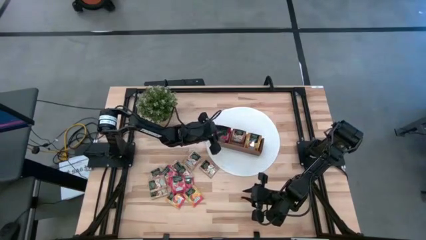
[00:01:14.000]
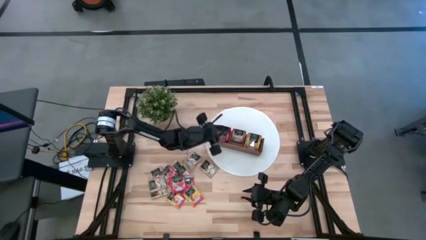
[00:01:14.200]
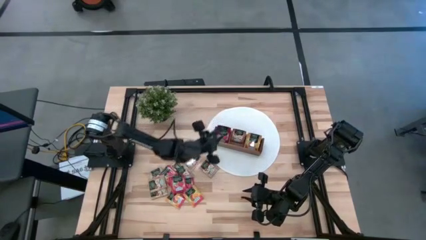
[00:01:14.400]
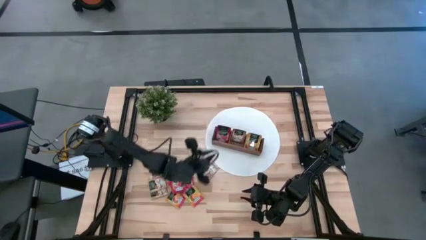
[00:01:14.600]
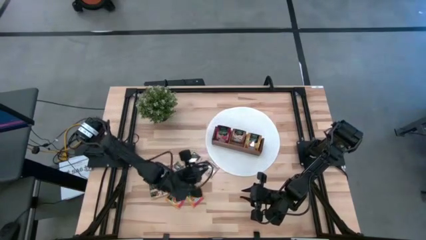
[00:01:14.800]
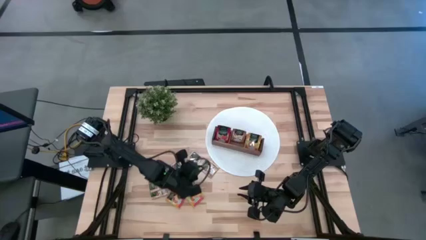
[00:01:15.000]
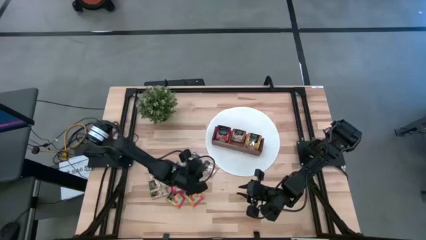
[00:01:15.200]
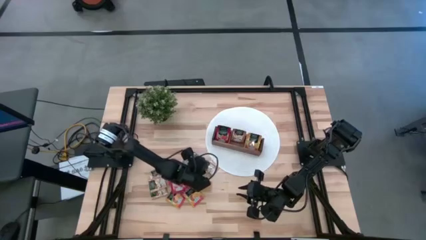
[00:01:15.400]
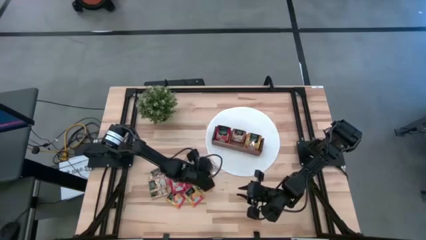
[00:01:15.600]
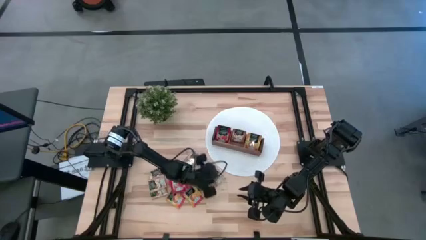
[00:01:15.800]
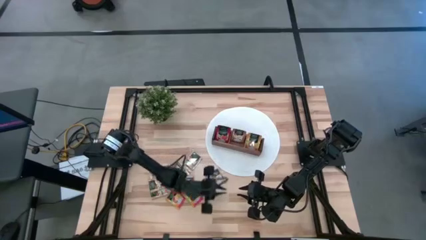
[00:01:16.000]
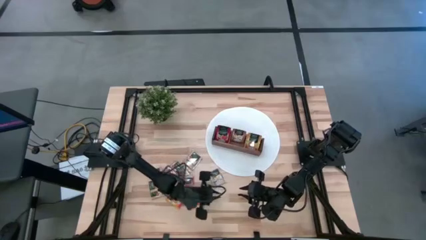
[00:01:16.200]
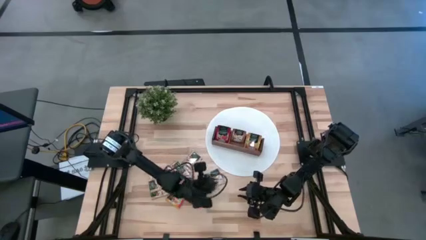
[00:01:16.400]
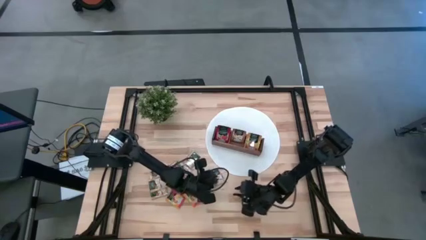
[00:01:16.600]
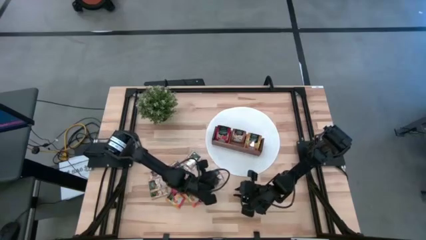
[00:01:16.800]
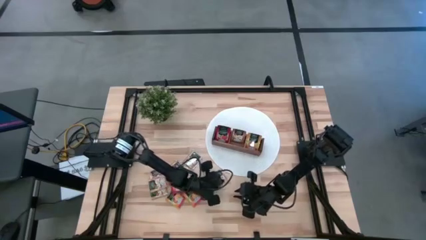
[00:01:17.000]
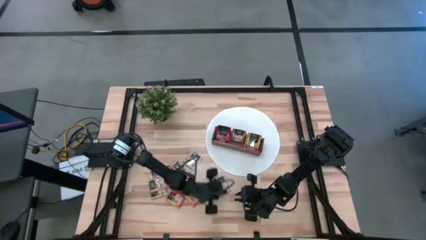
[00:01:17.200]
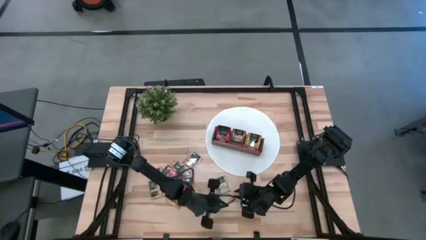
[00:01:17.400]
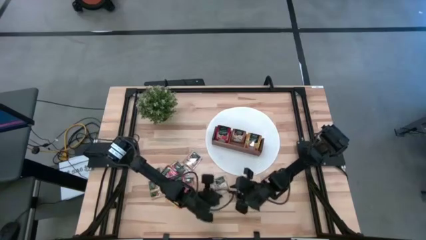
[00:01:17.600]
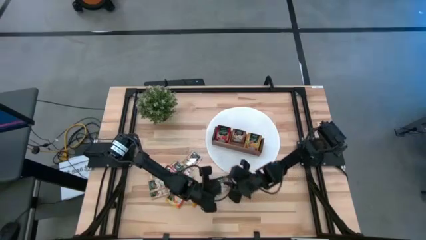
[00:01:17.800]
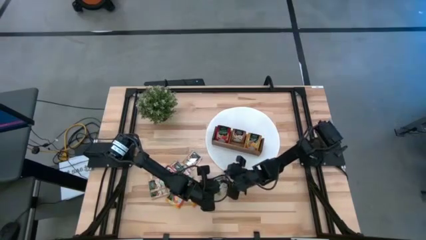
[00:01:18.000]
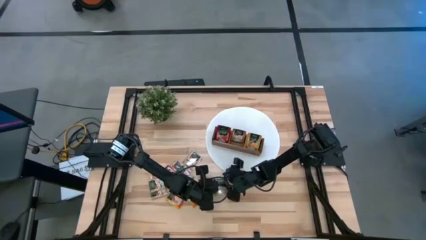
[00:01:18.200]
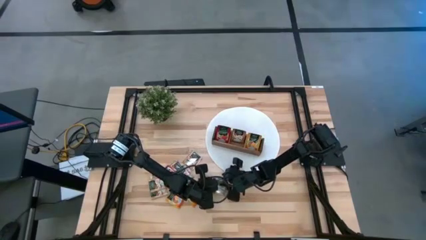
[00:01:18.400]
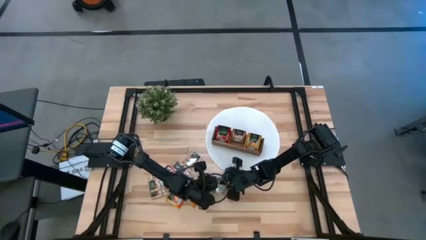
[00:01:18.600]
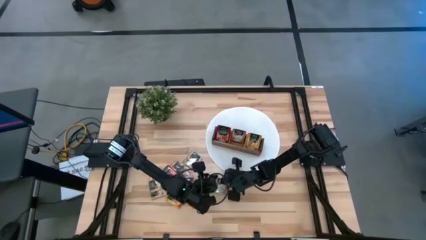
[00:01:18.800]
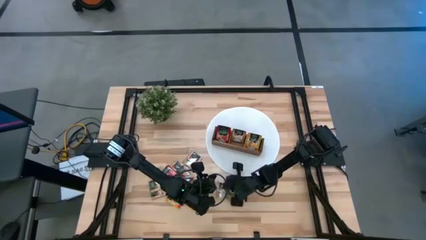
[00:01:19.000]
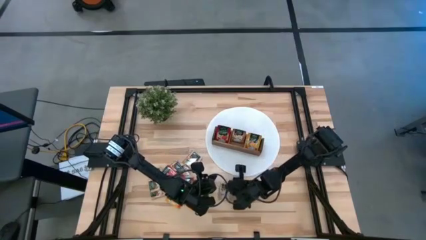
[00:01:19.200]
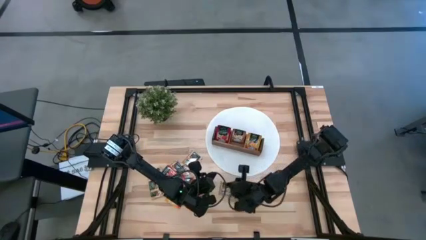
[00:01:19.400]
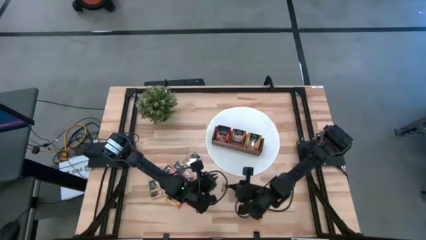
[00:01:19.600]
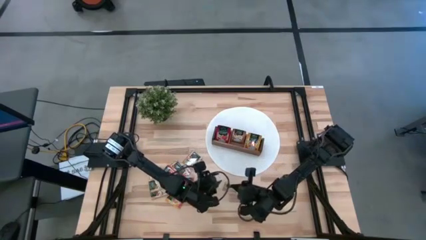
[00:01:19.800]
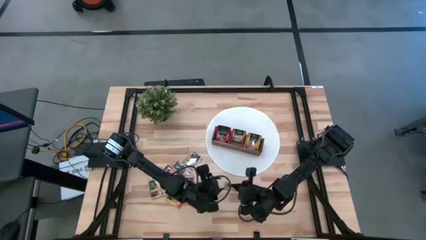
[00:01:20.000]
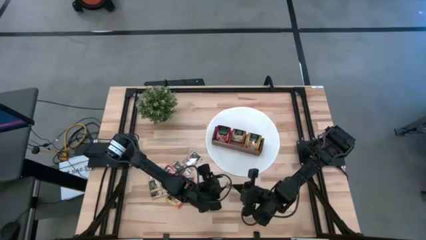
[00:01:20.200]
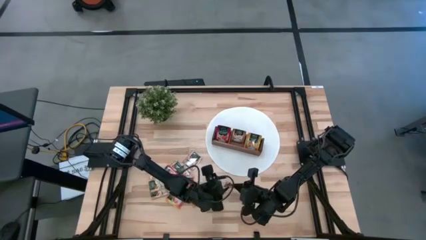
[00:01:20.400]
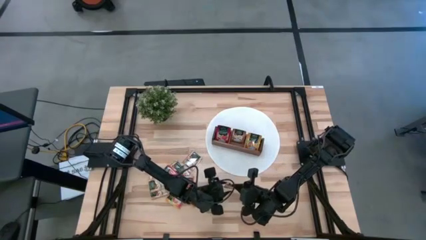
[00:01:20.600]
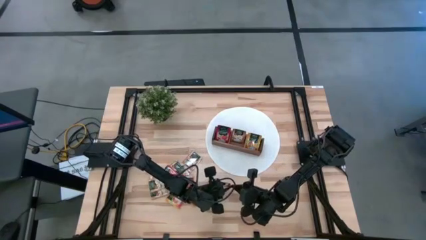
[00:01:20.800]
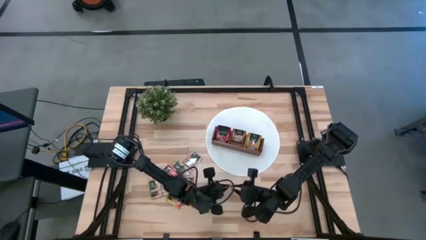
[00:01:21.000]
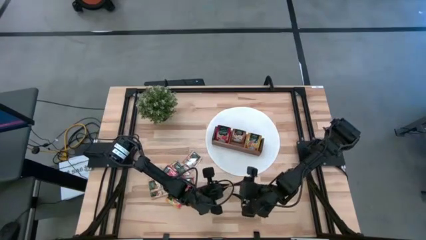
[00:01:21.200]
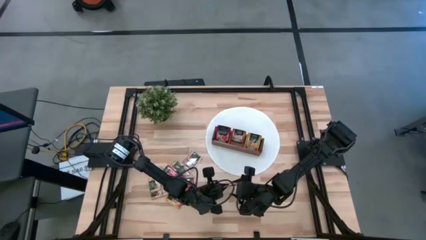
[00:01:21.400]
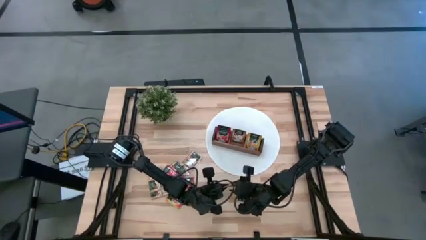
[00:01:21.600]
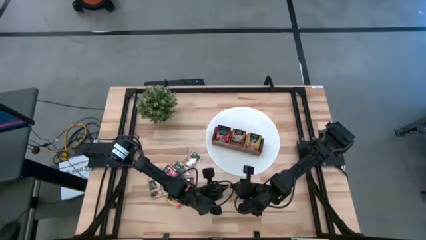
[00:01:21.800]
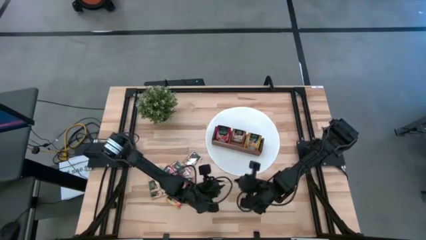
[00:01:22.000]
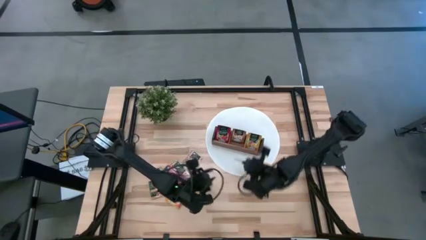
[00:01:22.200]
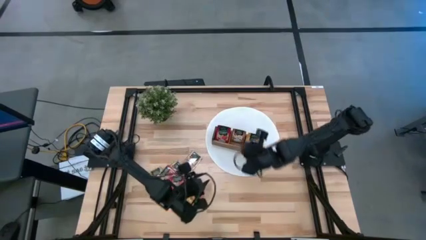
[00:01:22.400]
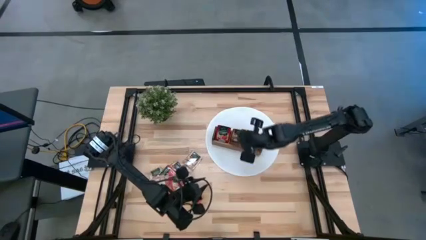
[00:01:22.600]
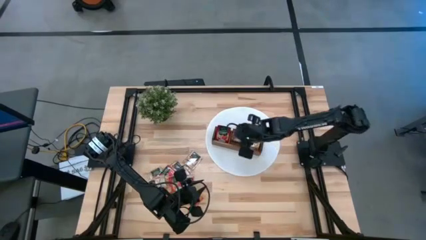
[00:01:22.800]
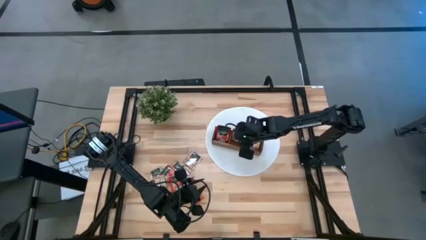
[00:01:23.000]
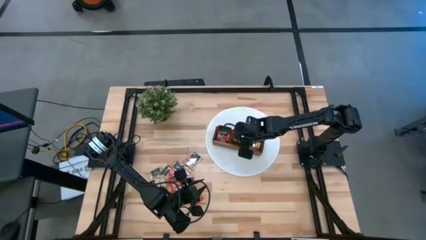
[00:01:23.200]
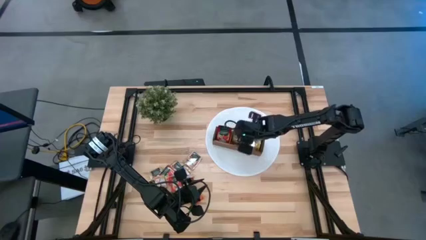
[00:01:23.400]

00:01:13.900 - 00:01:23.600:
Task: Pick & Place Tea
Put the brown tea bag into the middle section of the wooden organizer

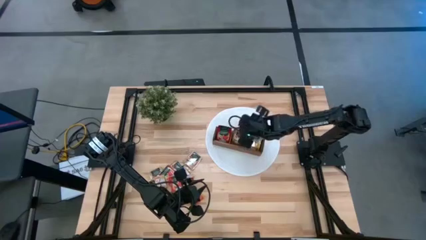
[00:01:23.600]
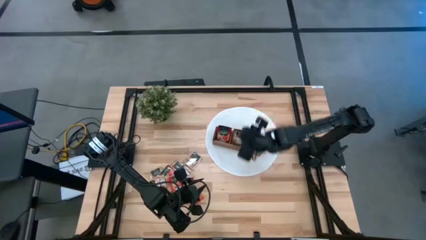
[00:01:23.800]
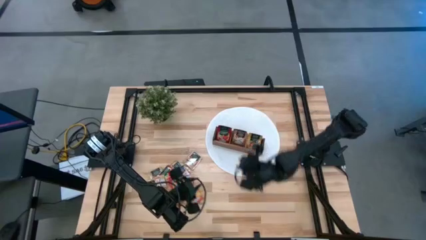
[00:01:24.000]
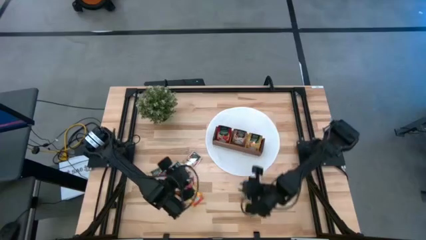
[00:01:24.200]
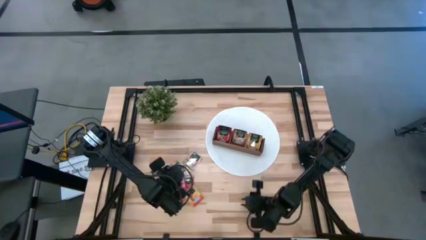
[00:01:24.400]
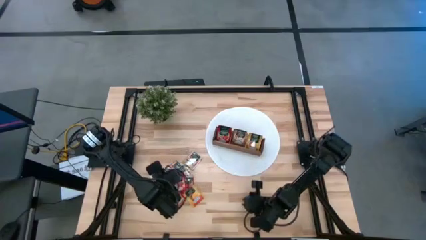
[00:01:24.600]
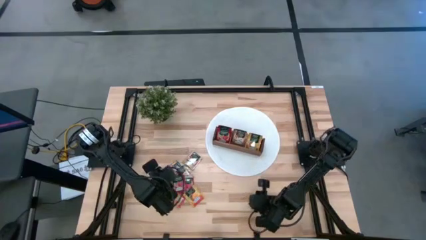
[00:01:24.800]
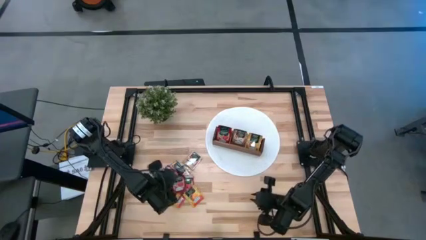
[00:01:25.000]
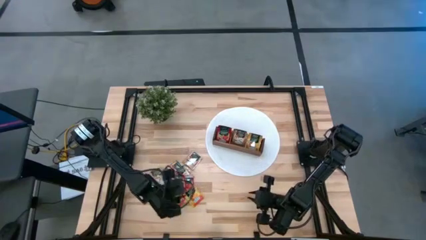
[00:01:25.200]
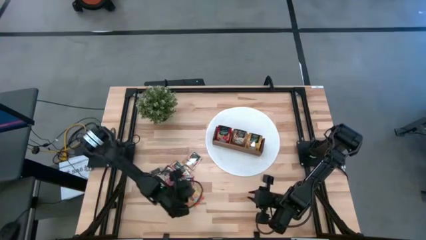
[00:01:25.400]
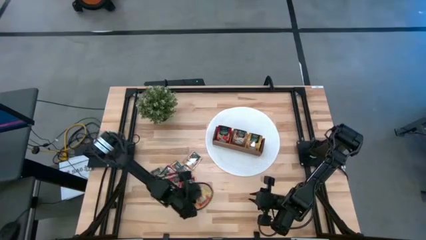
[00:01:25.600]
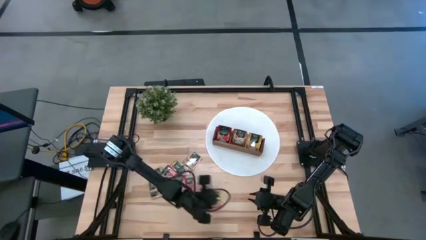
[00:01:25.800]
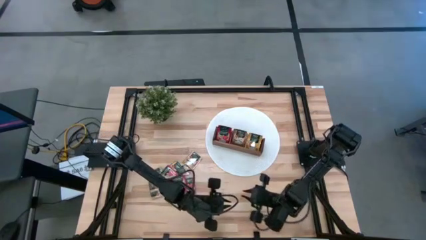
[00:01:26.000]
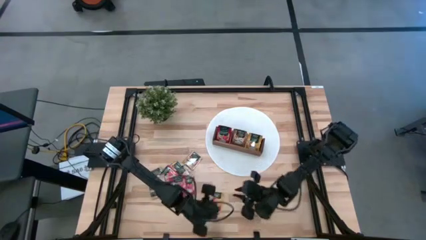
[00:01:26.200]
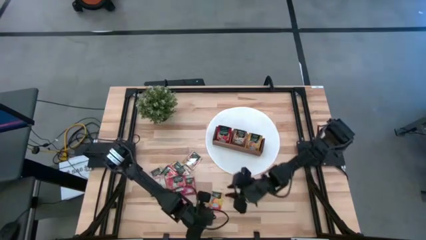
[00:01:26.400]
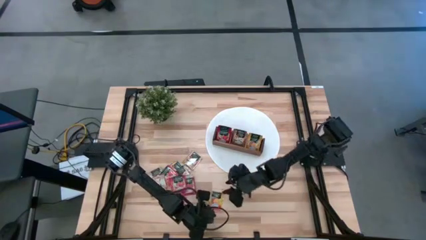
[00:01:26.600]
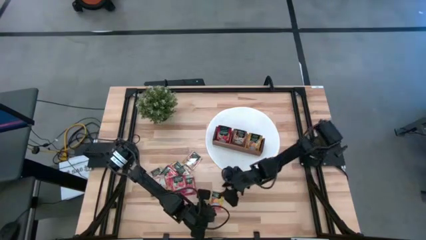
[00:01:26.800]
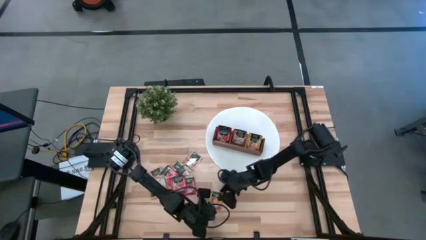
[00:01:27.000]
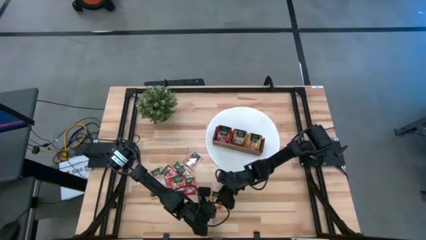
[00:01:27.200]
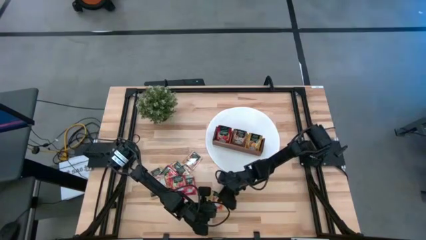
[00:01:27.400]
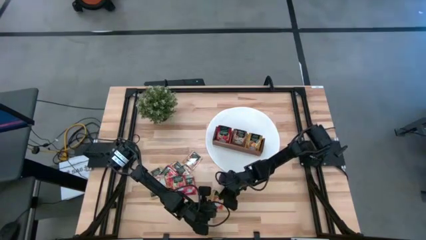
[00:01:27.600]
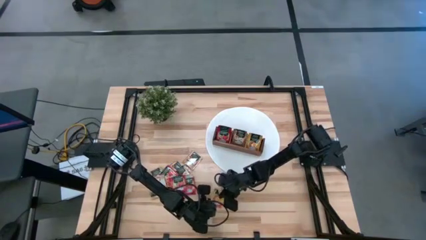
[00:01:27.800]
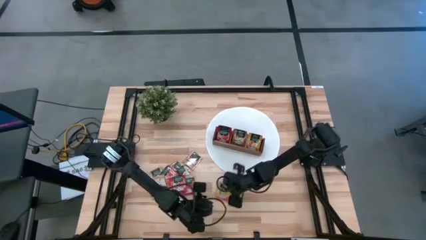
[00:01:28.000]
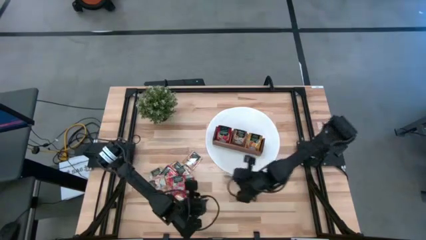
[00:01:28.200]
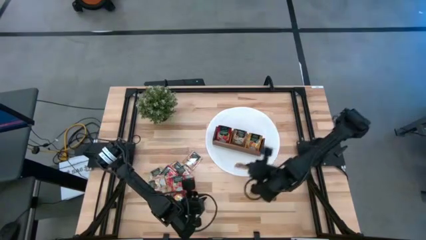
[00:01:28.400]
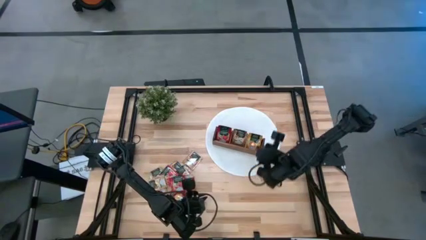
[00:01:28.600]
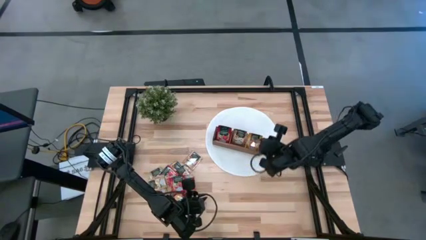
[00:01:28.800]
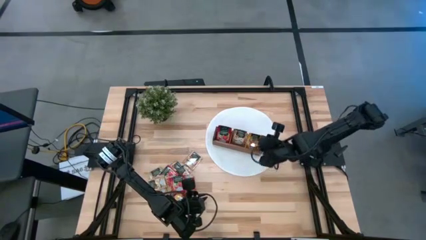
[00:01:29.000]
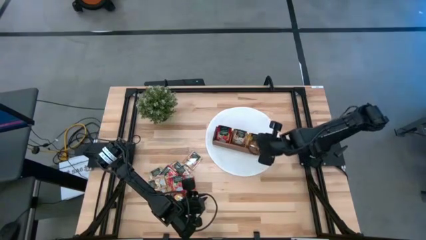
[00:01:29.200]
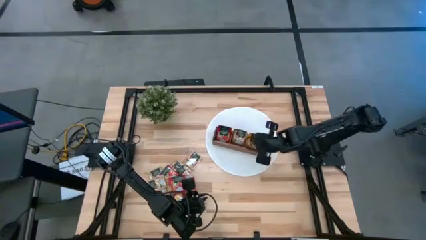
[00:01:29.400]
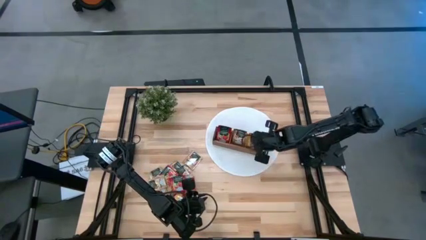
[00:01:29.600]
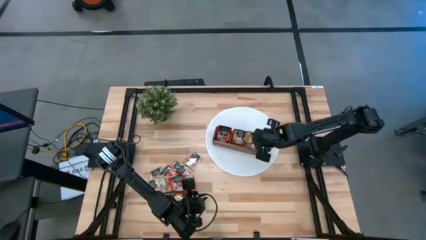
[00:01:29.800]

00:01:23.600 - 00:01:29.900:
Put the yellow tea bag into the right section of the wooden organizer

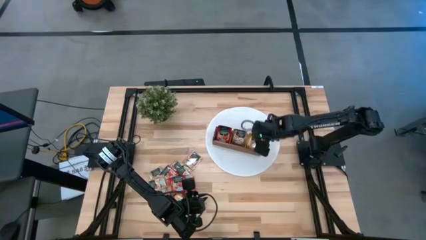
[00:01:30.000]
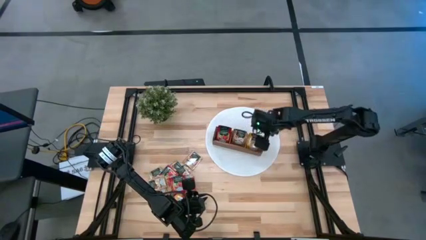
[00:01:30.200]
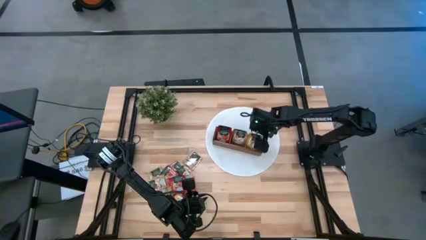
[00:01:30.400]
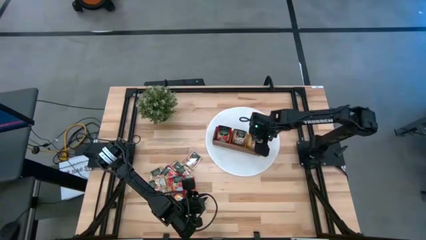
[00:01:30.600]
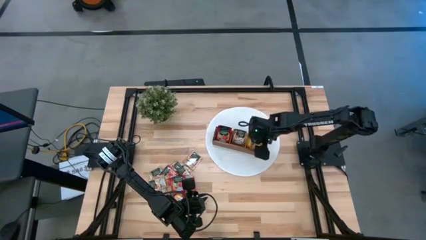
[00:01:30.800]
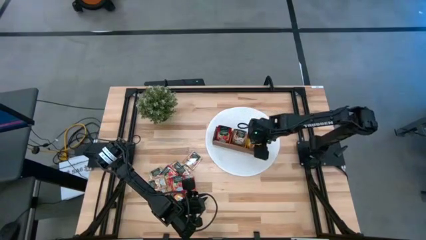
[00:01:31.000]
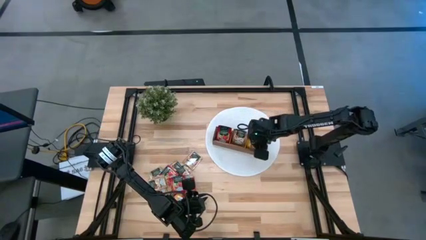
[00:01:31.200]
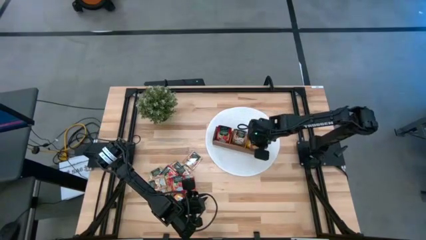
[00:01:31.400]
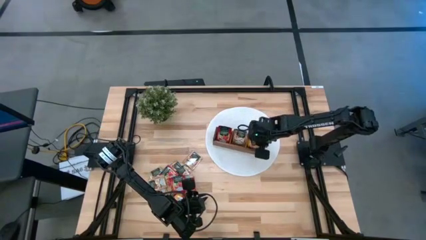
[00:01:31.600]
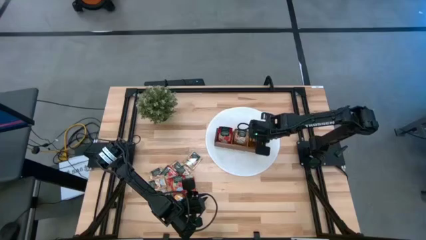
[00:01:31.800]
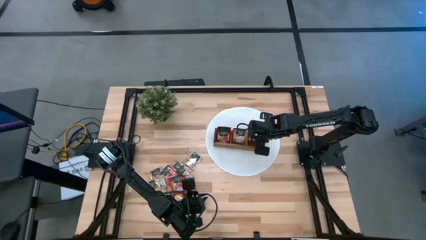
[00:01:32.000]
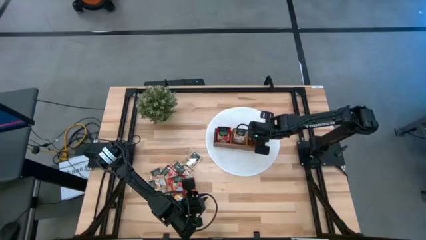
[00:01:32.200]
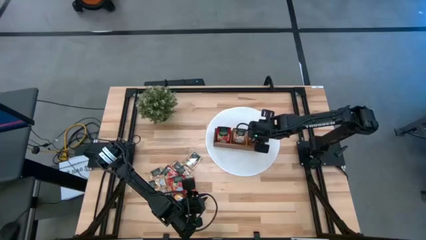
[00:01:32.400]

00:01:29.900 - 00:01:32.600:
Adjust the yellow tea bags in the wooden organizer
